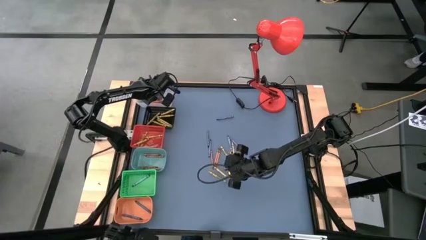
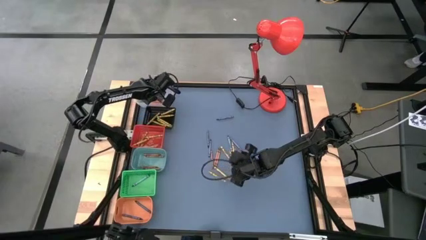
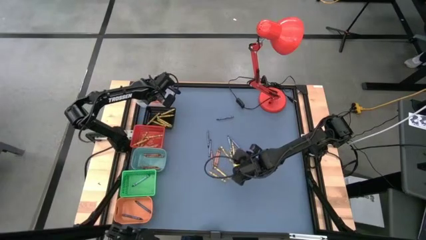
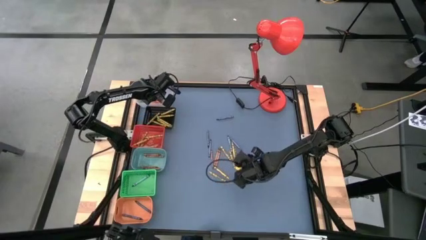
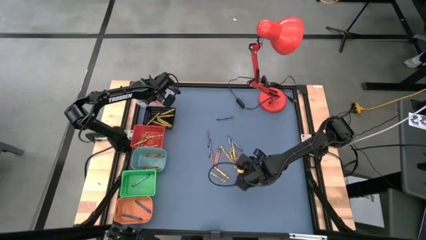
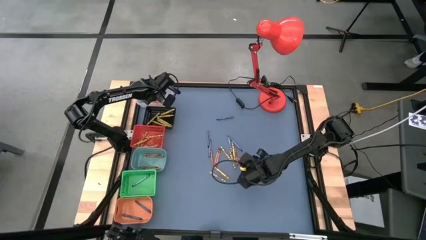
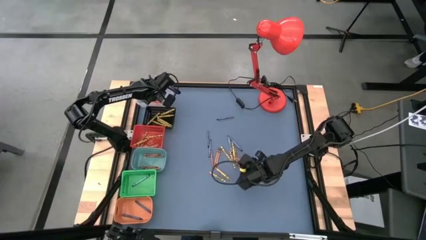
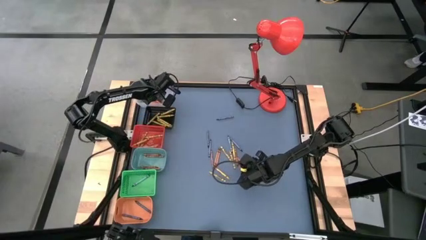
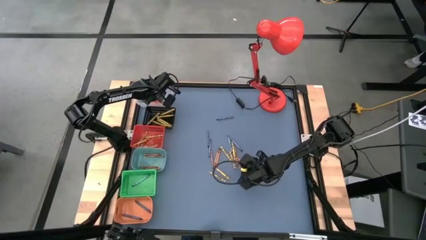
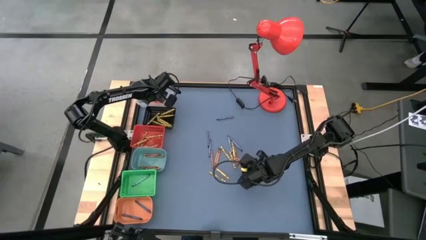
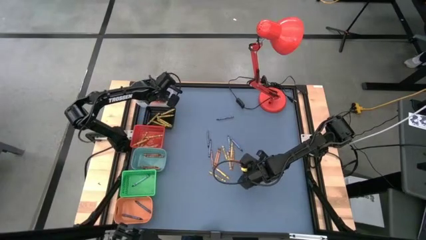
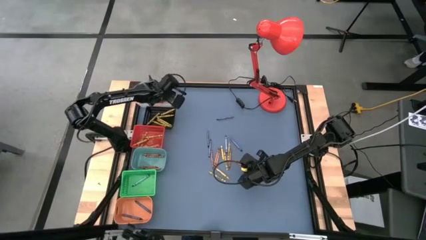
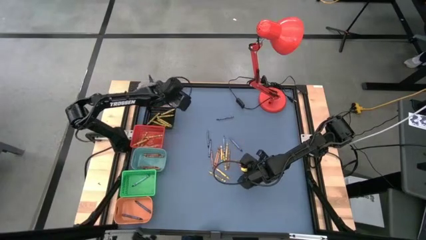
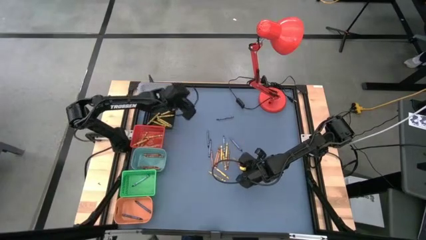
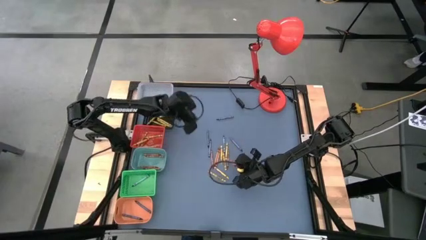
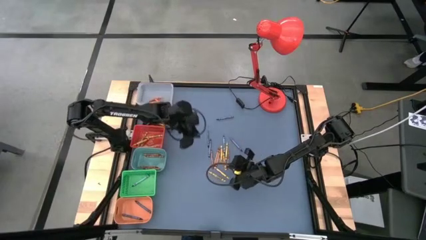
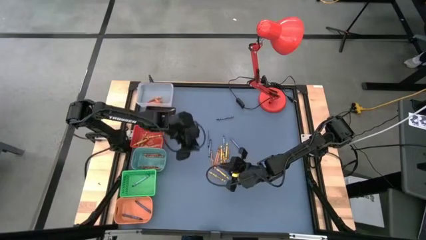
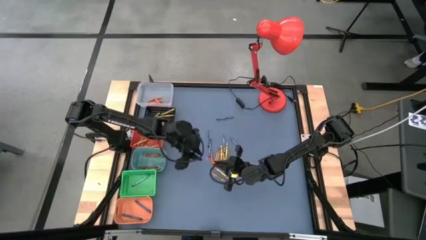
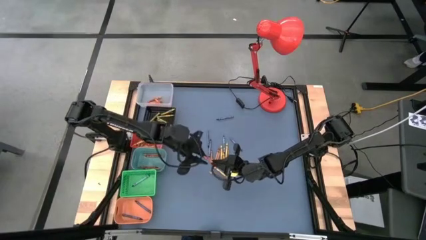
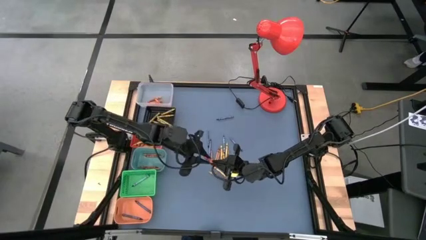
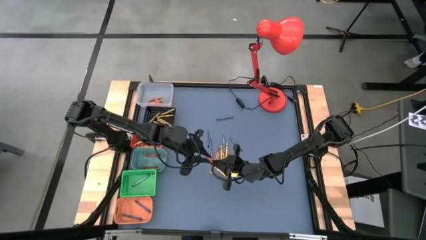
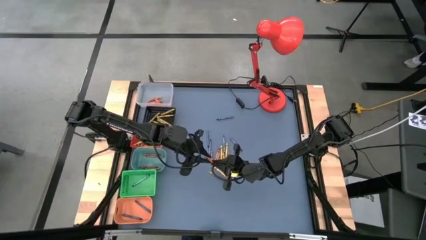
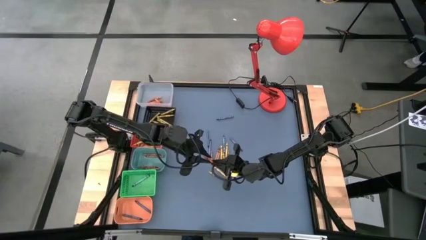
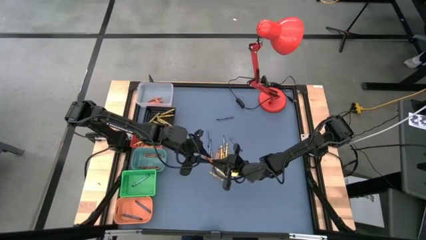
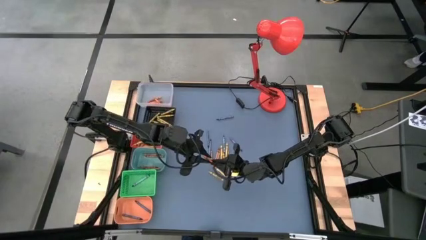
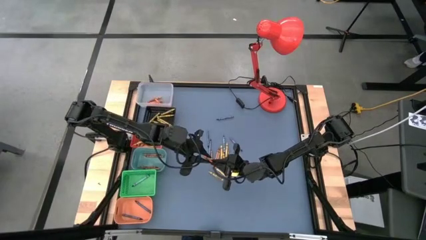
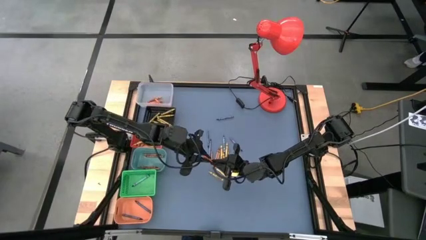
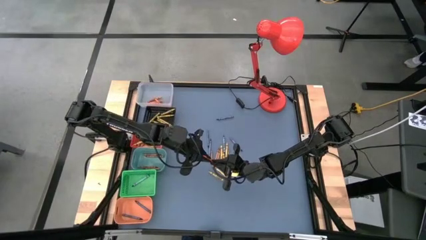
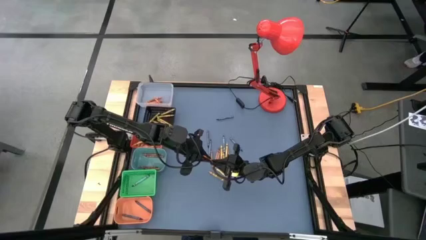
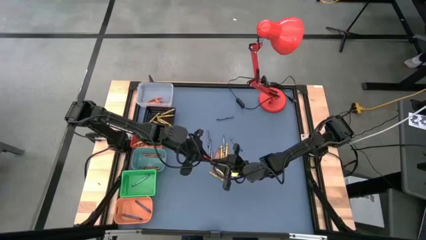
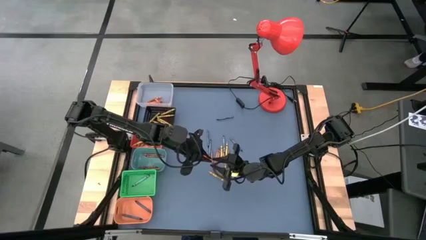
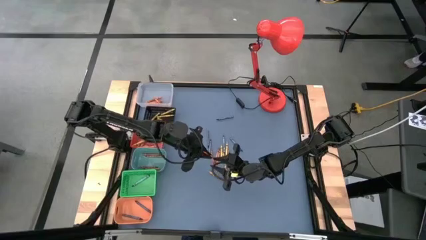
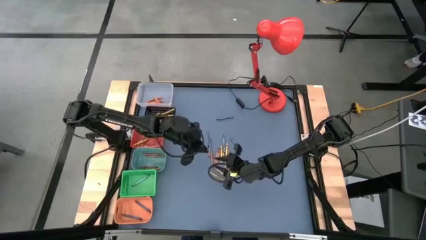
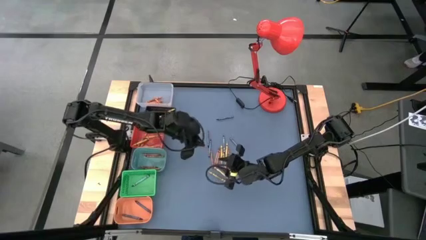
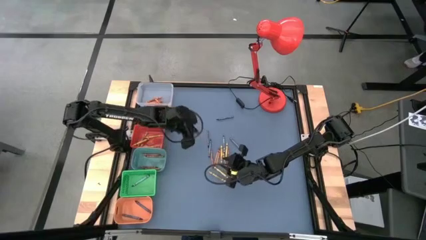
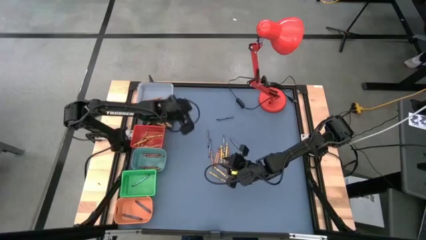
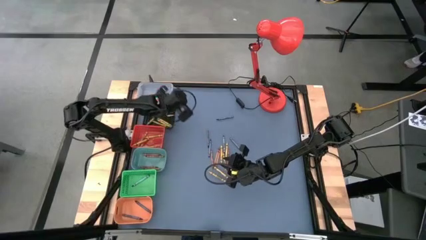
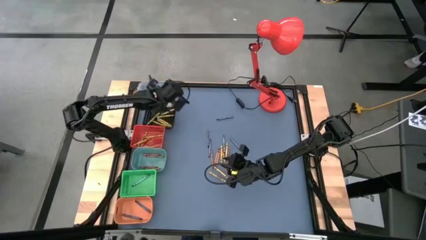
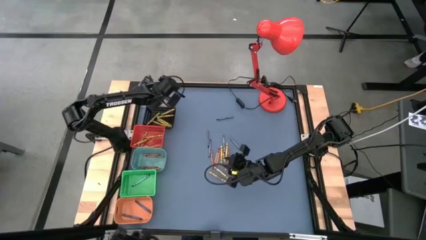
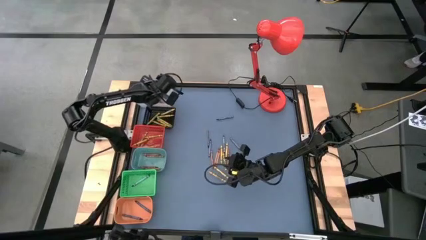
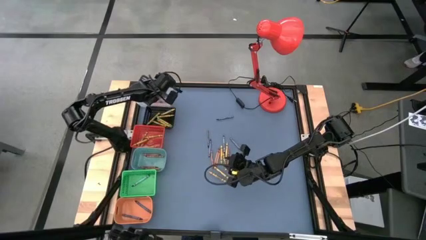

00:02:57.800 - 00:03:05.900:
Task: Sort crayons
Put the orange crayon into the transparent bin

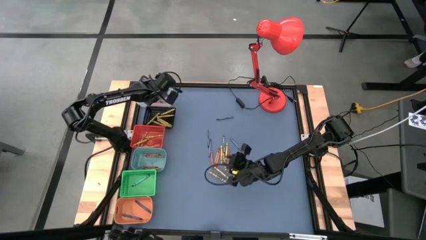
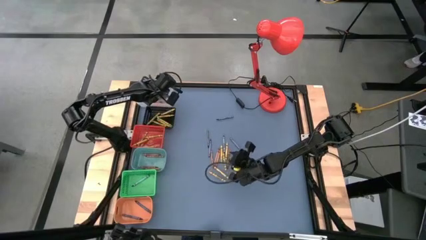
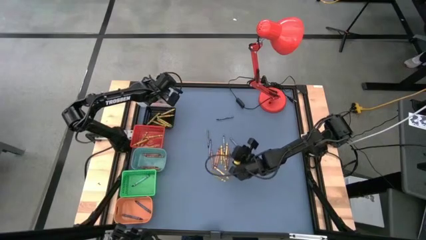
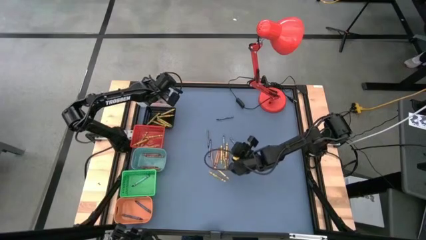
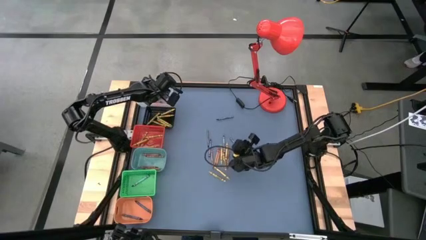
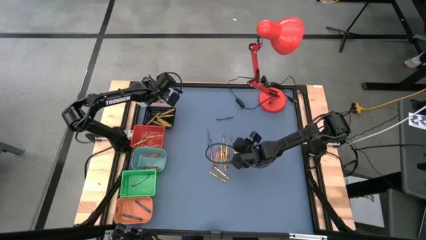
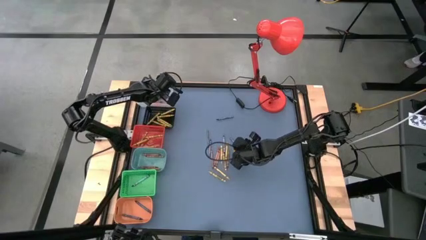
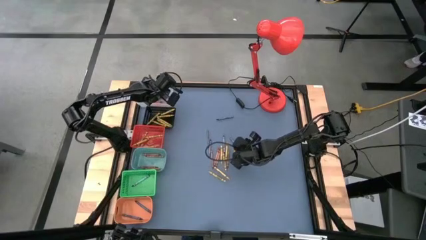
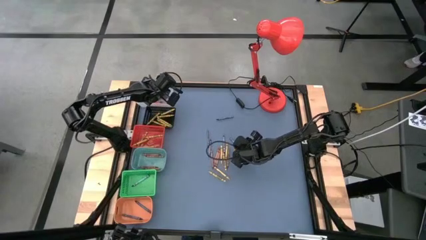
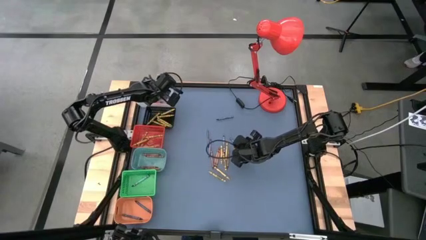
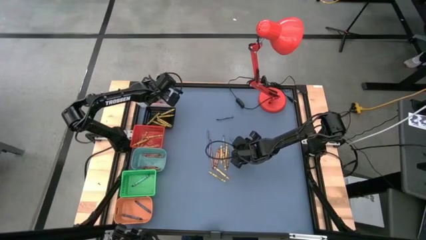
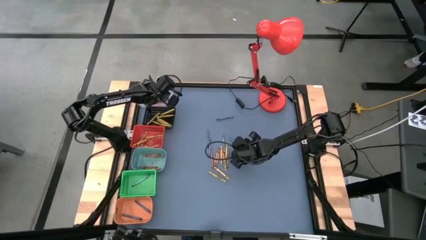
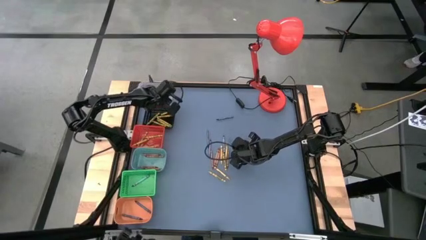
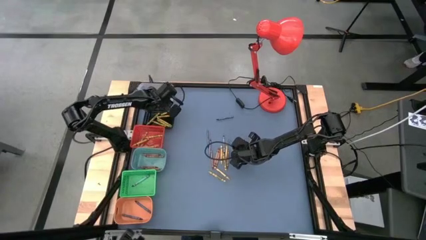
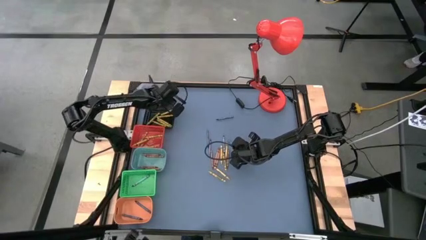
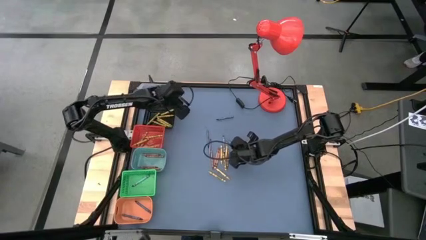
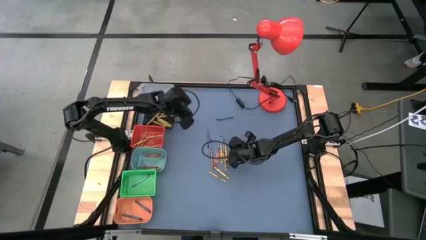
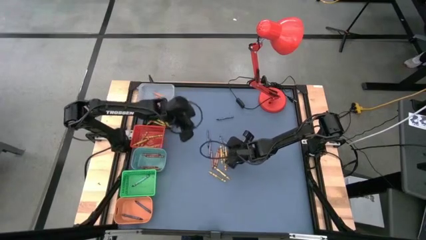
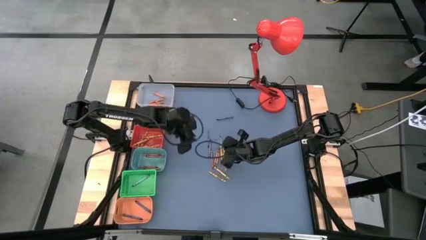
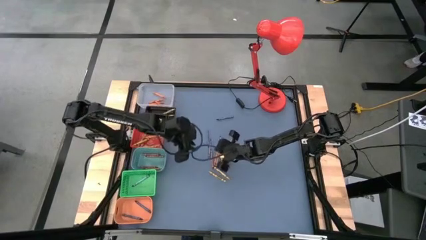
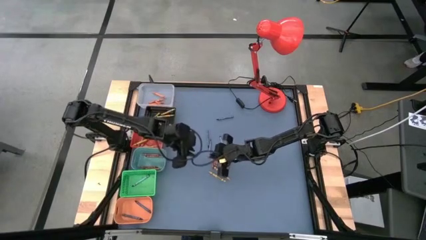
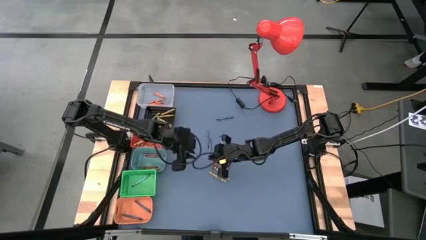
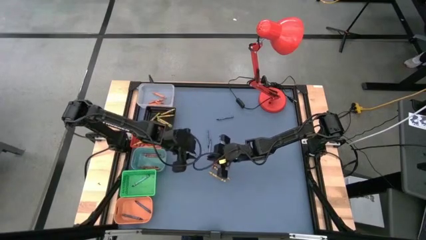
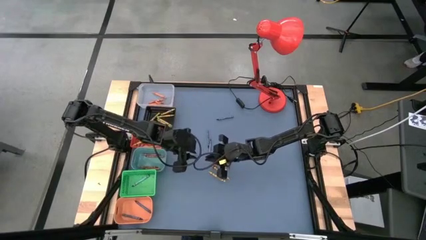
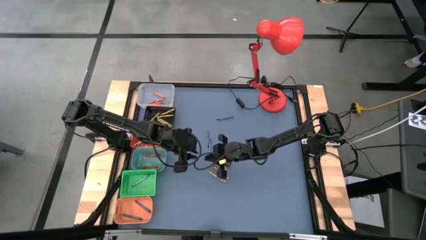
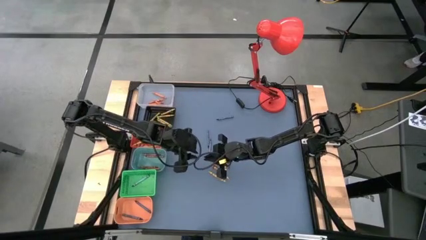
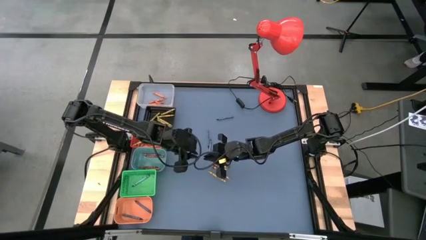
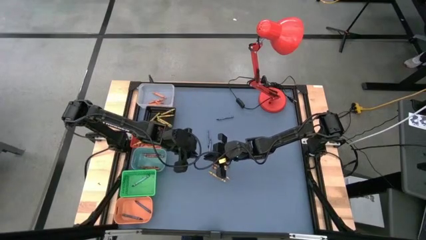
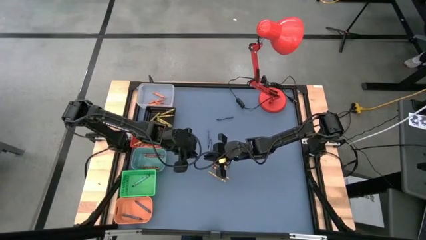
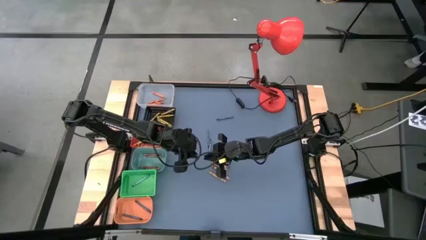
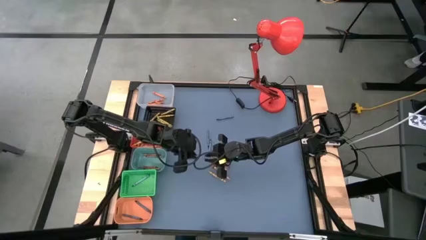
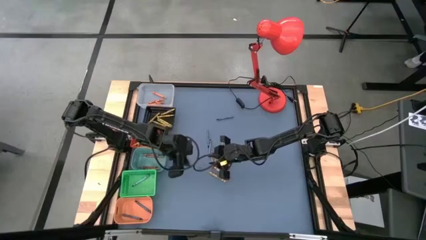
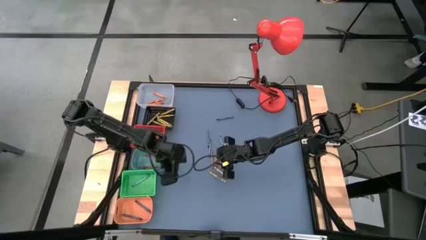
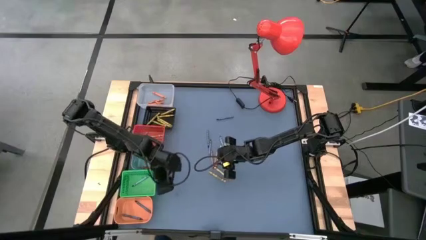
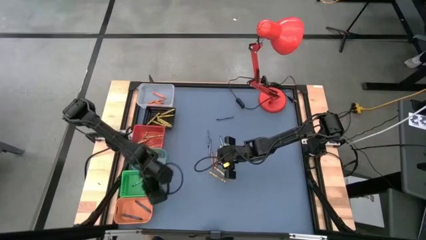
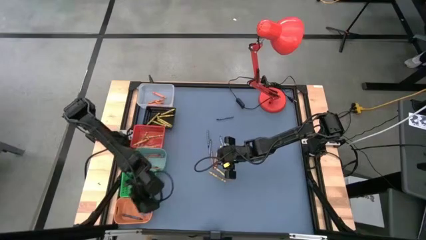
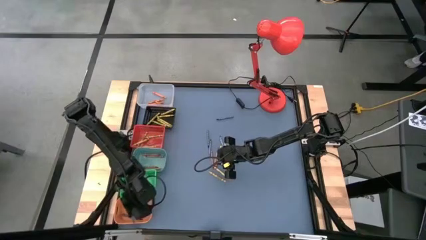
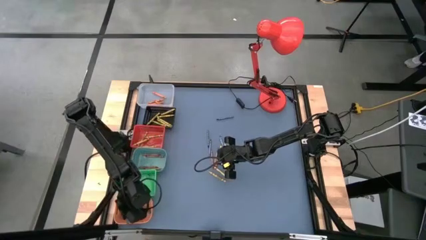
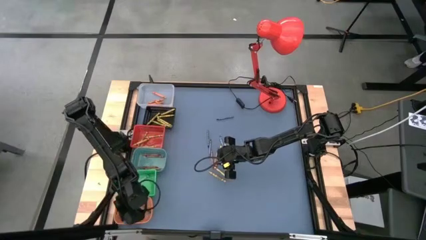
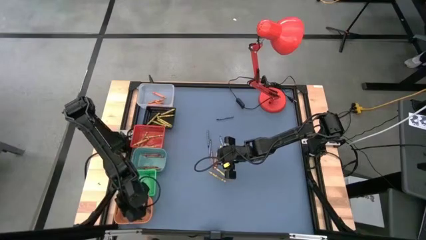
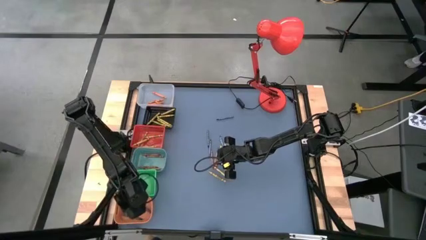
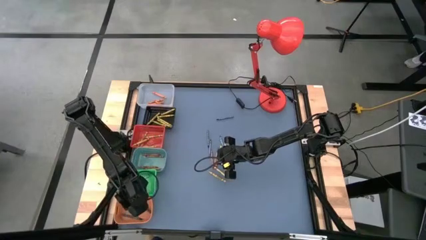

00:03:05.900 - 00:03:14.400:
Put the violet crayon into the light orange bin

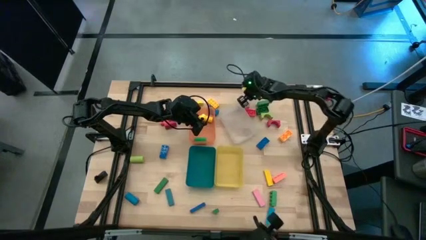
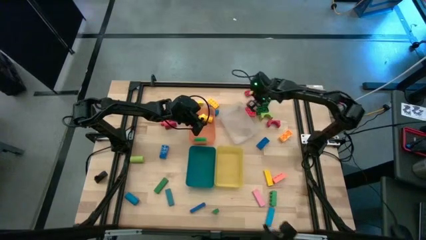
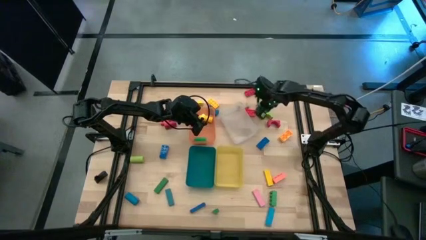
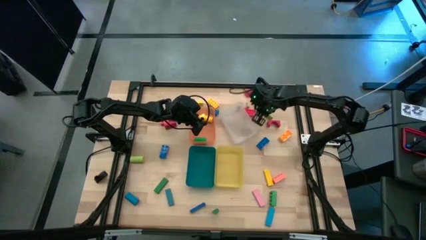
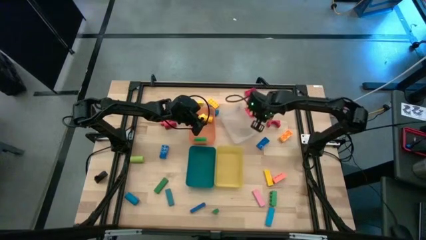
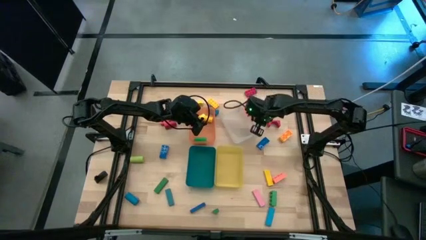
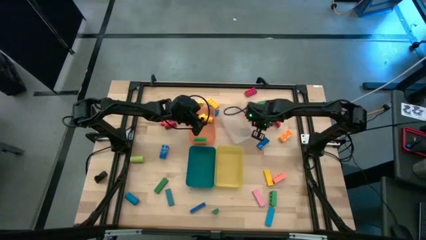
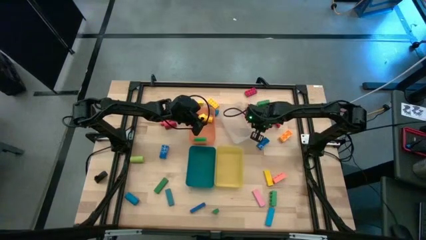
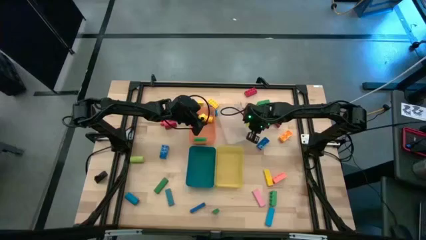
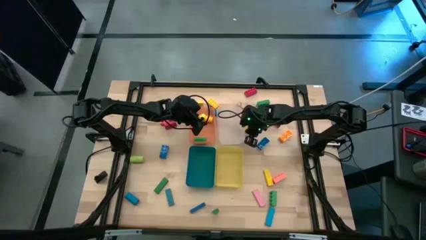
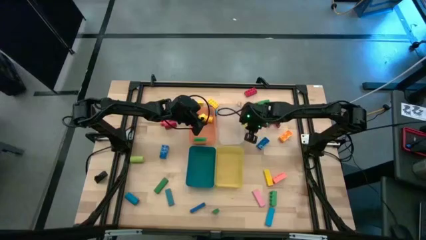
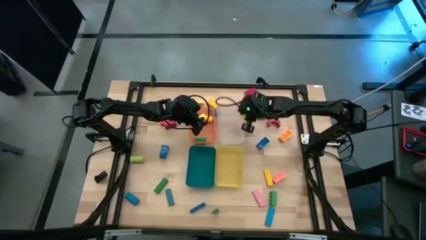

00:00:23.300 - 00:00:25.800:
Task: Sort blocks by size
Adjust the transparent bin
